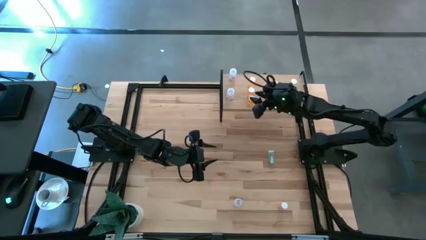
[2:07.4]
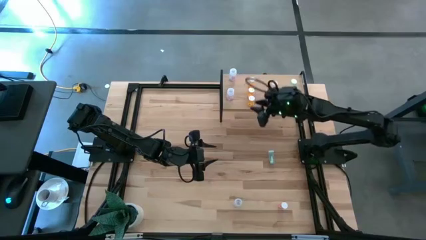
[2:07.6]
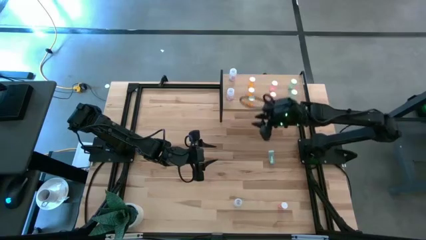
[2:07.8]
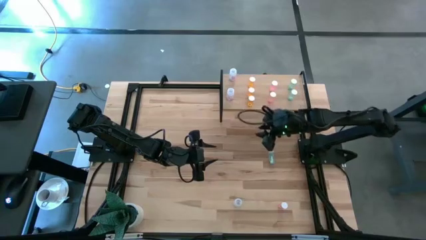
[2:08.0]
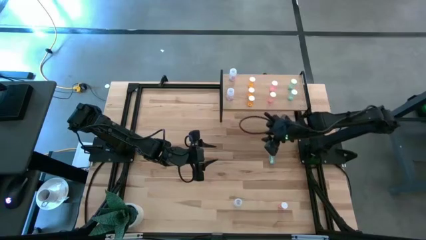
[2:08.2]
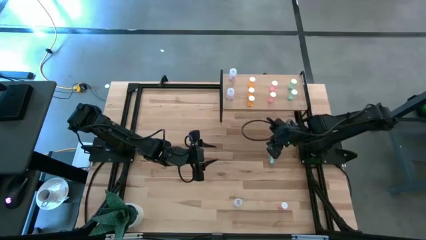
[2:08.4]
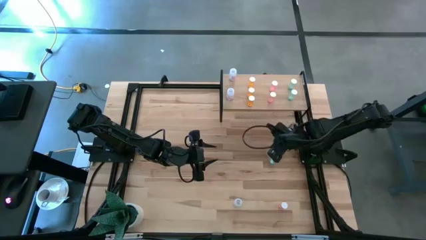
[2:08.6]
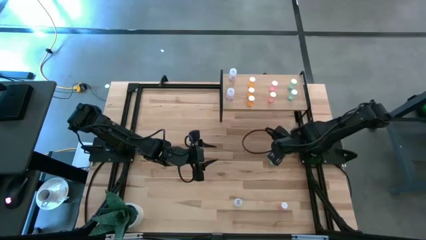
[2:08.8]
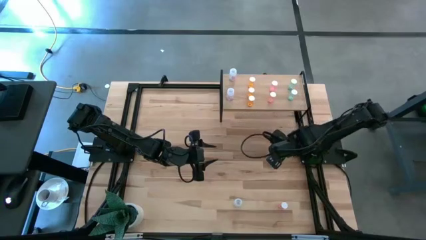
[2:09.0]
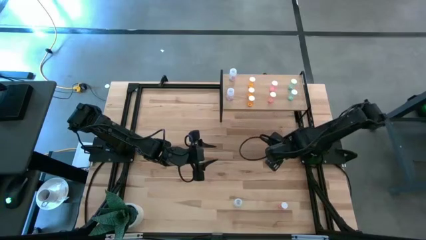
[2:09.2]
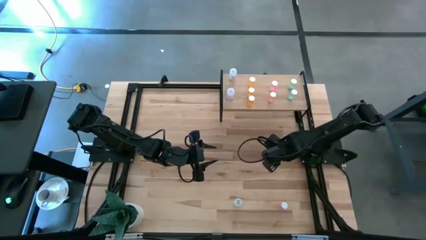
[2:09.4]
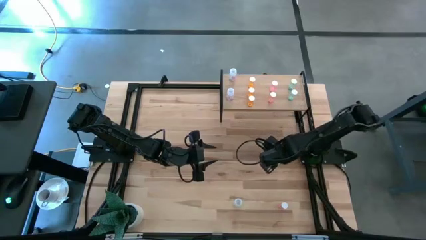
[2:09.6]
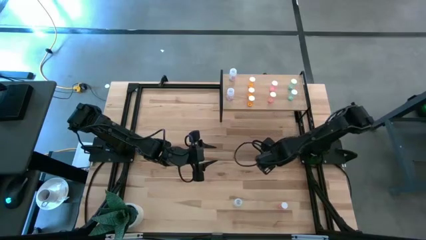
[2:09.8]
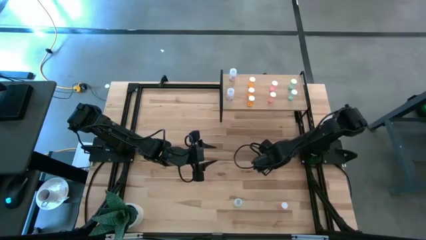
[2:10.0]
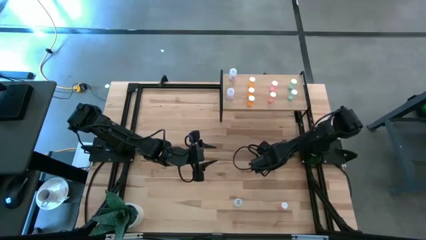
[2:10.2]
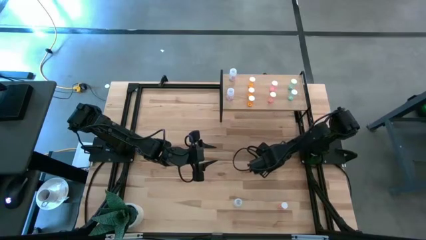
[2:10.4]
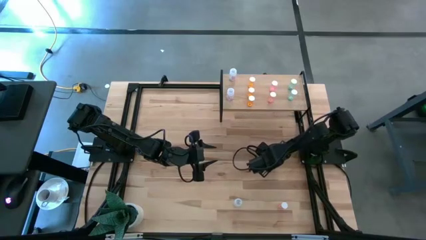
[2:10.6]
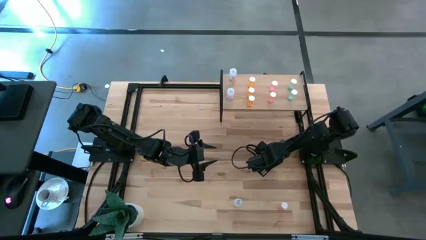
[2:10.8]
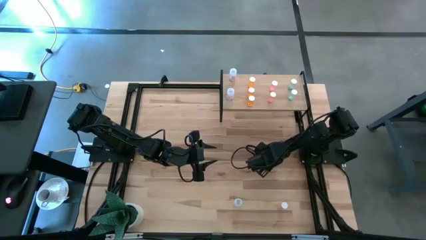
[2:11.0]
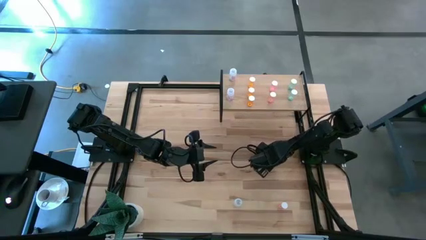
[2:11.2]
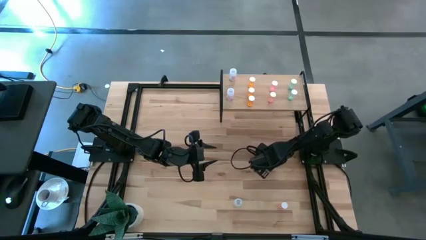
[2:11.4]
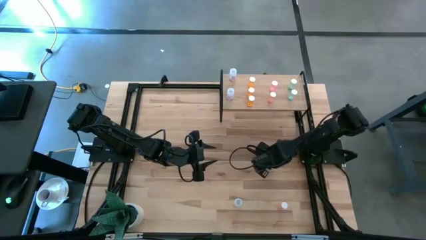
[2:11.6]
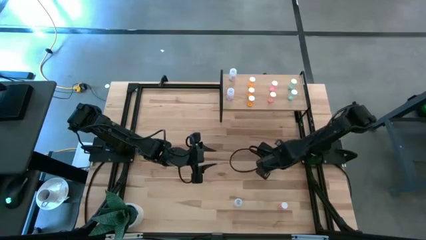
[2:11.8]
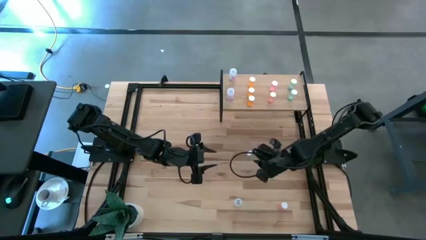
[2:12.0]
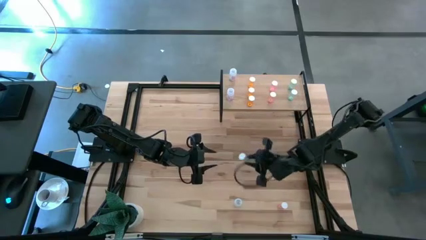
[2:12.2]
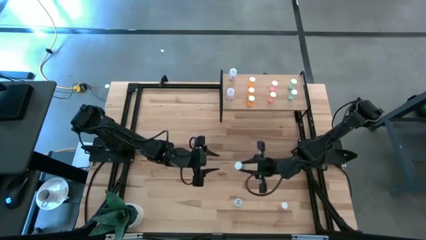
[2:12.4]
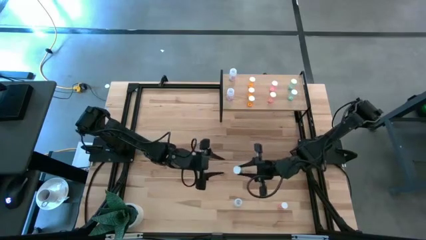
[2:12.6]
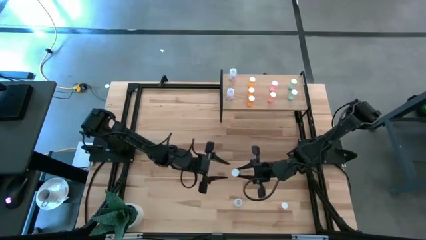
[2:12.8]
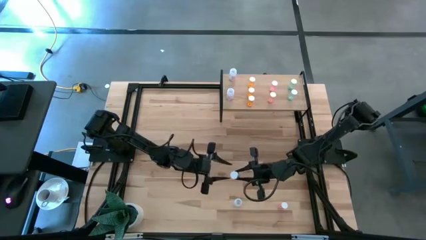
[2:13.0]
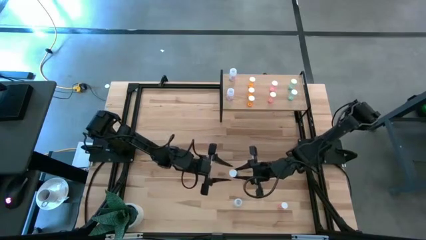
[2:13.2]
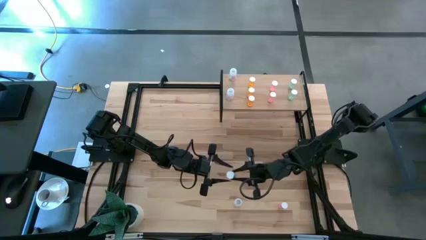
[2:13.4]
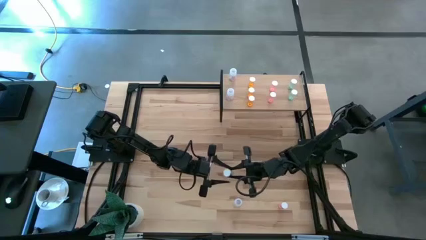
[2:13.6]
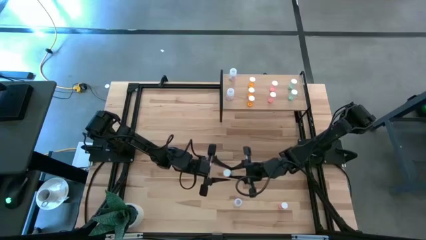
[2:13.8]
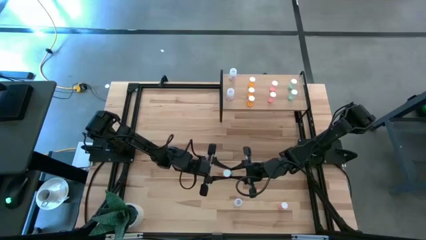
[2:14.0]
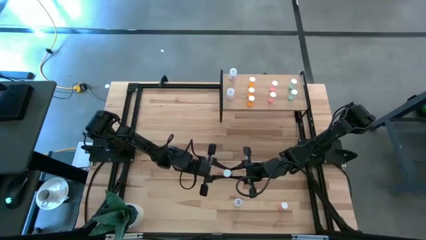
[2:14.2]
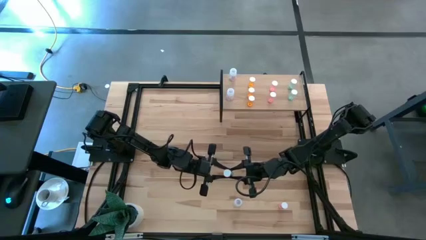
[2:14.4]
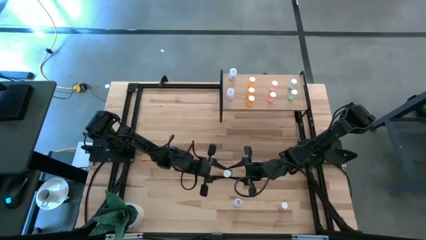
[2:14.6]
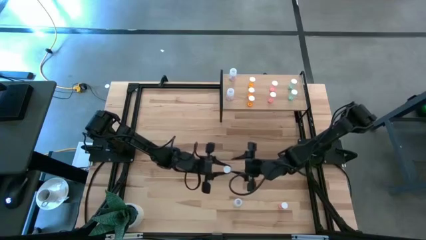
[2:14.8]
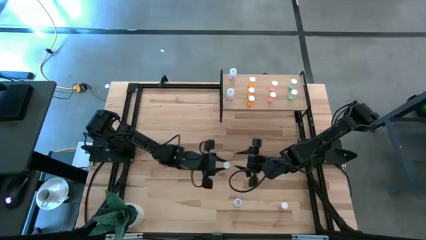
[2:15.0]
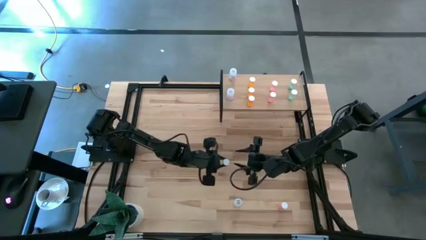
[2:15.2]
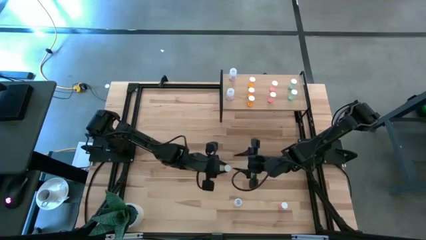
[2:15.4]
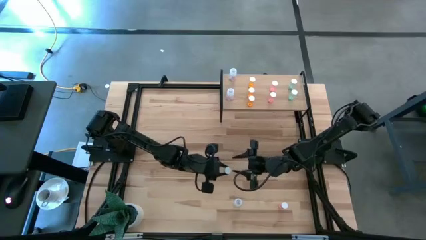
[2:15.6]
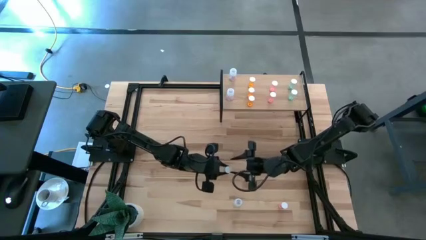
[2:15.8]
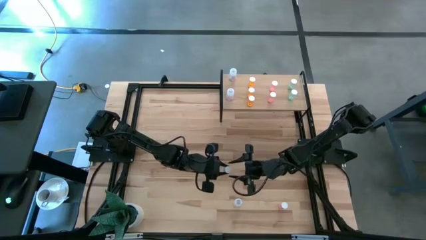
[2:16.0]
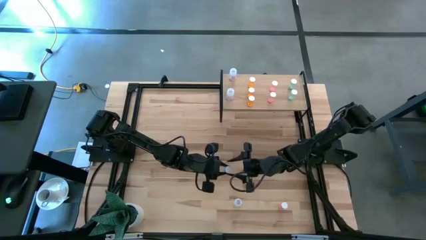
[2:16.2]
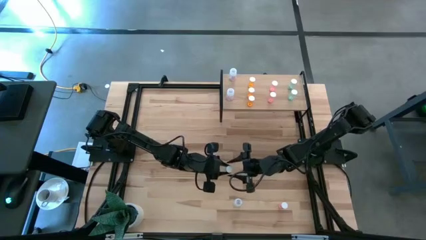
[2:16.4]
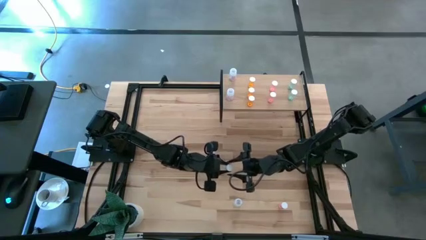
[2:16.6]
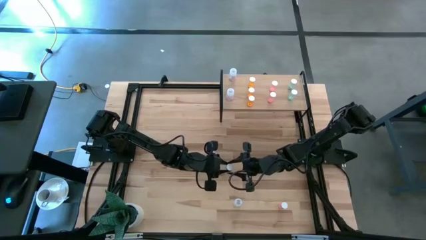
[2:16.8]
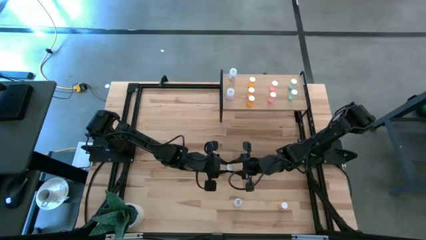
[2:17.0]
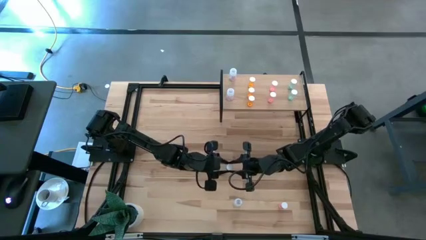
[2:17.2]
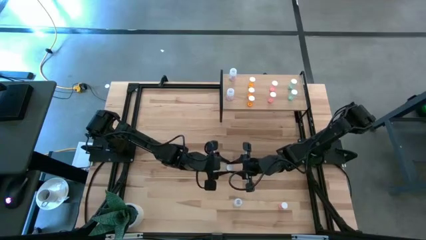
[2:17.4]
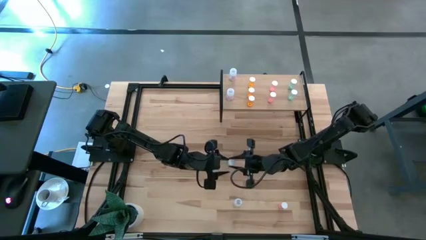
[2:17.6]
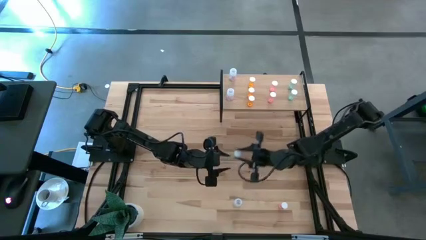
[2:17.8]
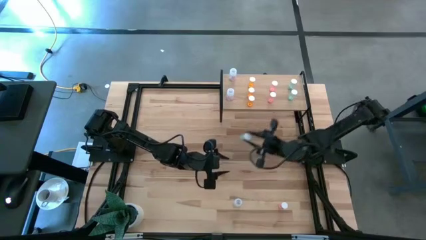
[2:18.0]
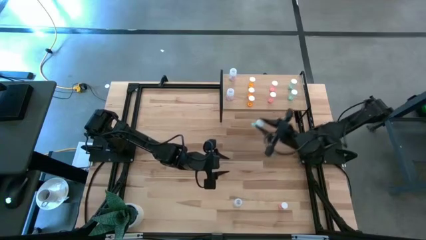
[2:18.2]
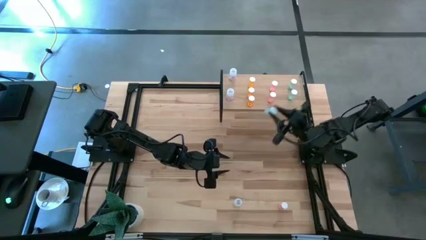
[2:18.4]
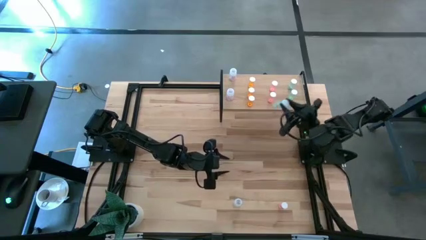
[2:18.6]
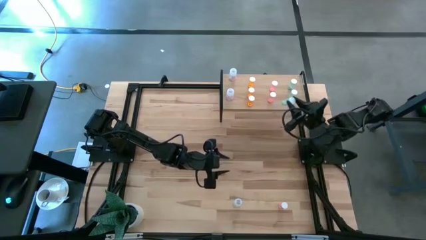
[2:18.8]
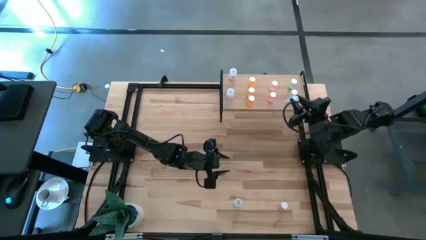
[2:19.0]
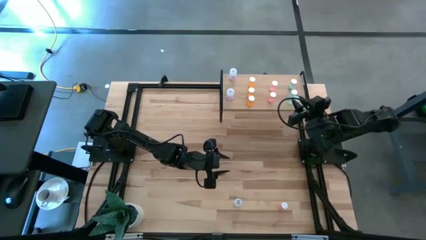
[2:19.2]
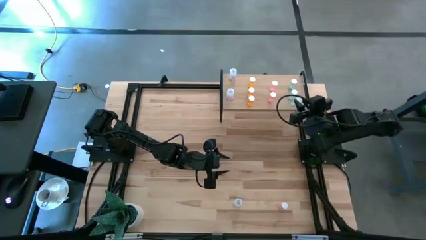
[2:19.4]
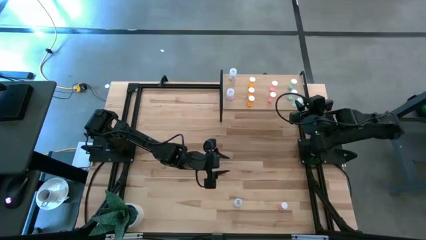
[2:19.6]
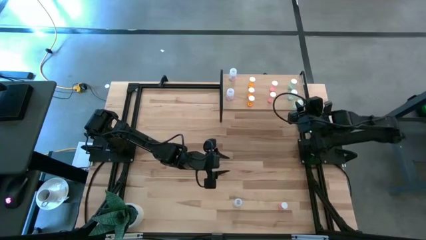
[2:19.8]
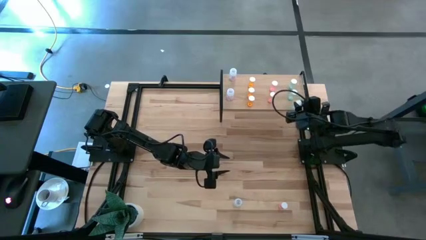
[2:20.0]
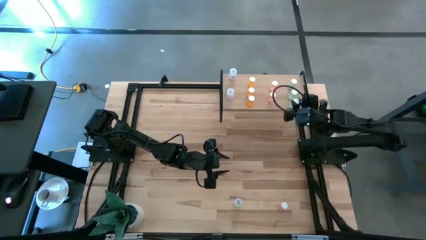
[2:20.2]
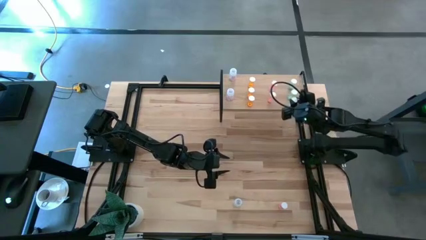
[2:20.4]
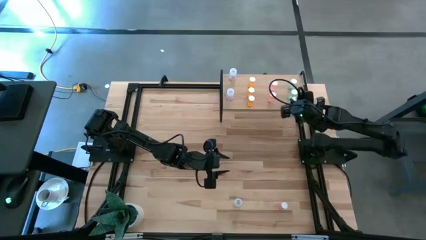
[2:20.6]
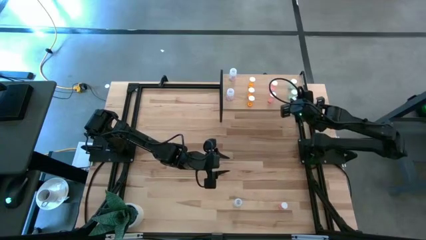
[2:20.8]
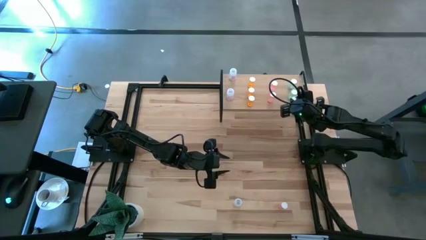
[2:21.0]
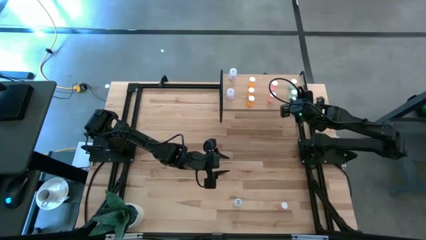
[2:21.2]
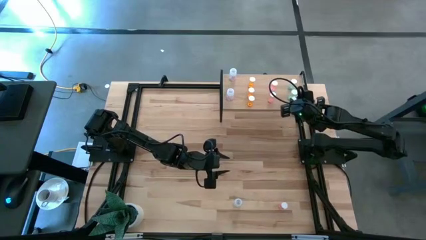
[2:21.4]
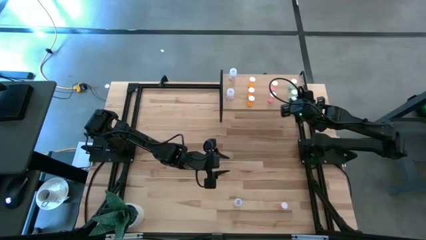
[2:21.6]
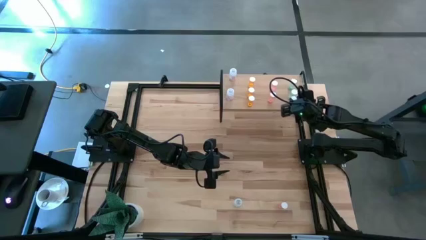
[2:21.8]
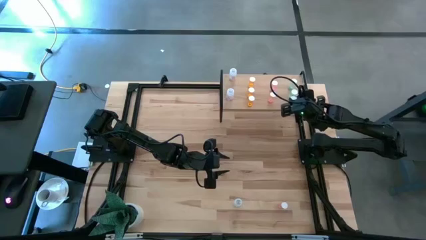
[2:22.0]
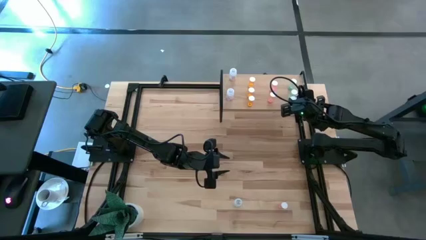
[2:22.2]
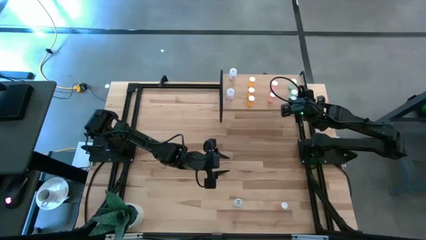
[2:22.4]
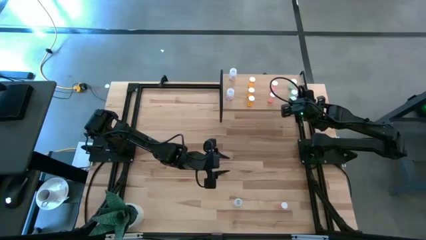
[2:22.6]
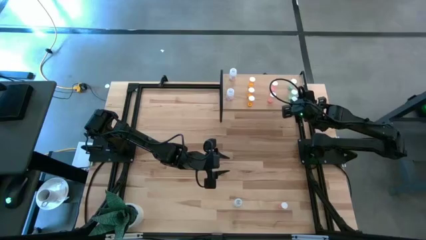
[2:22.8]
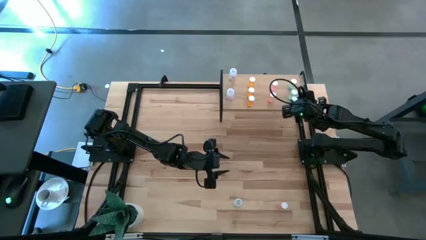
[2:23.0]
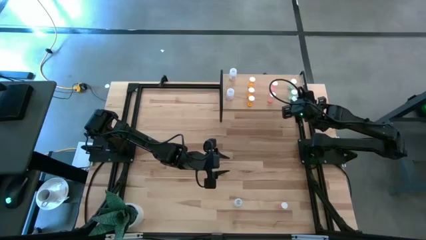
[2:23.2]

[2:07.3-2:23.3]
Task: Pick and place medicine bottles onto shelf by color
Put the blue pill bottle on the shelf aligned with the other blue pill bottle
